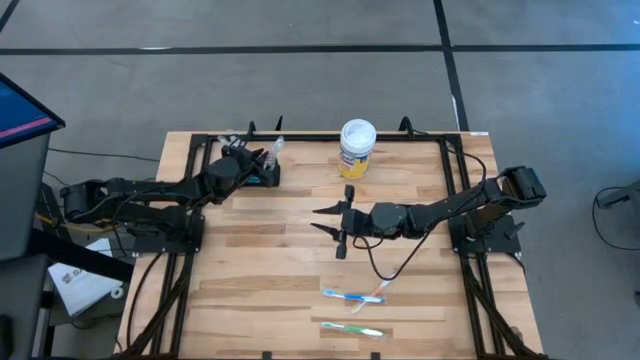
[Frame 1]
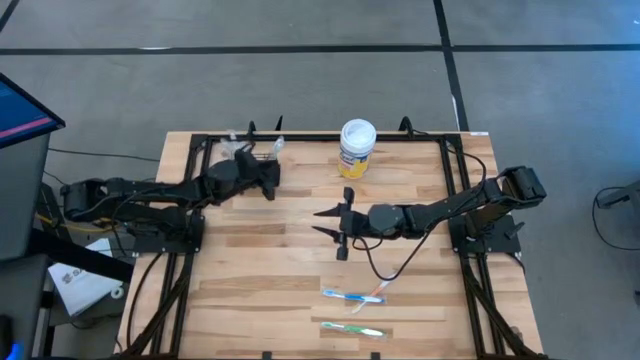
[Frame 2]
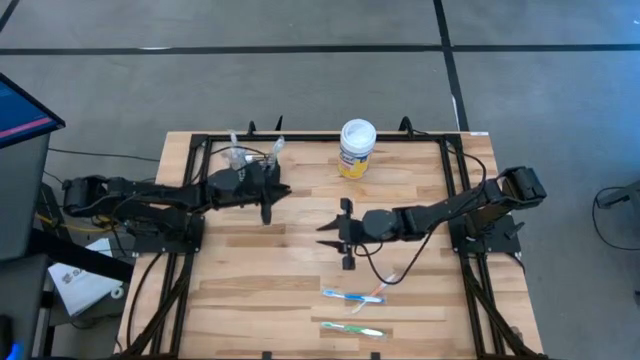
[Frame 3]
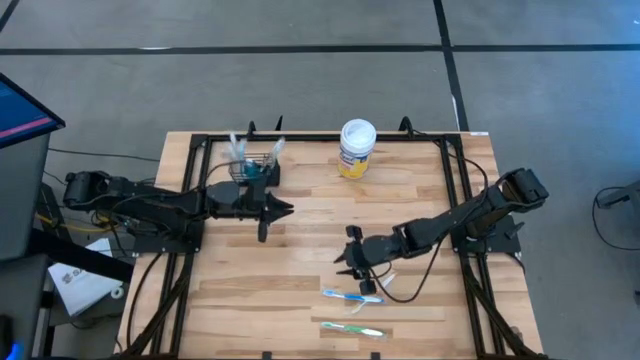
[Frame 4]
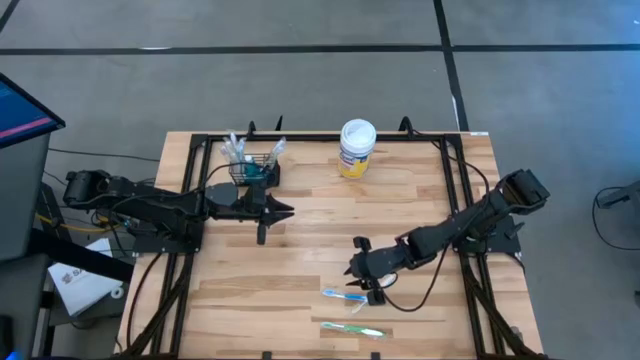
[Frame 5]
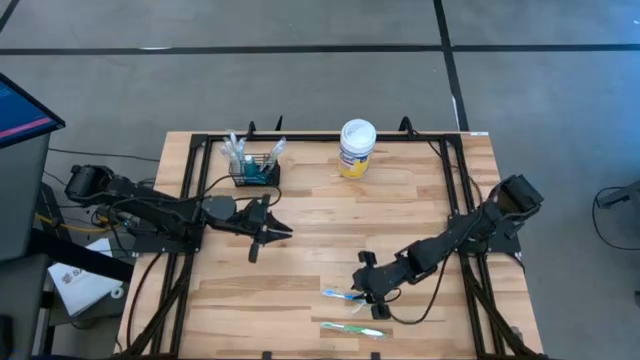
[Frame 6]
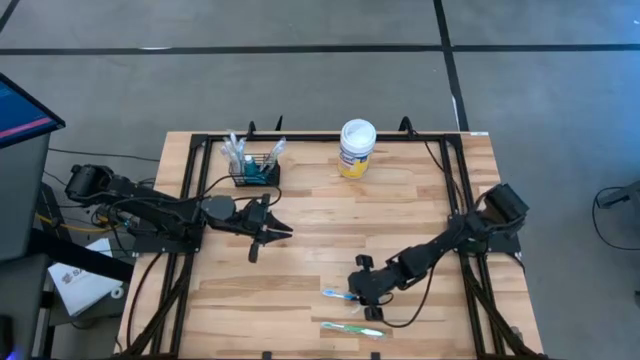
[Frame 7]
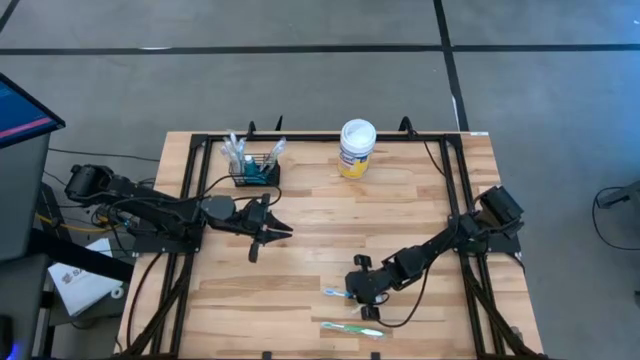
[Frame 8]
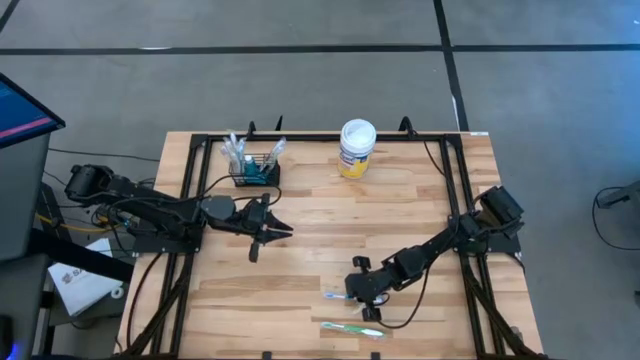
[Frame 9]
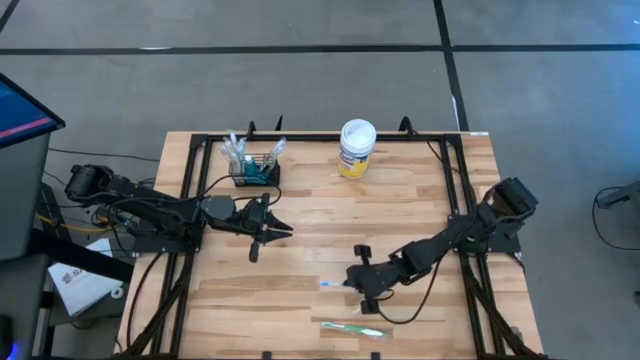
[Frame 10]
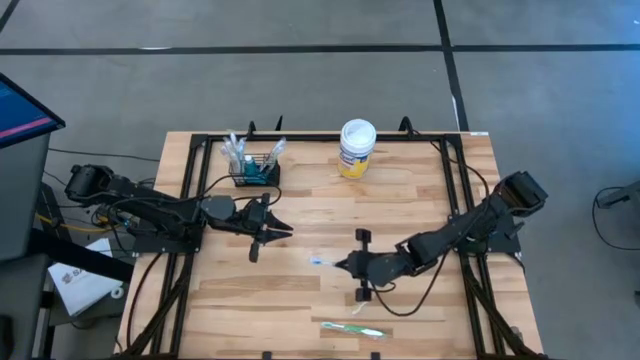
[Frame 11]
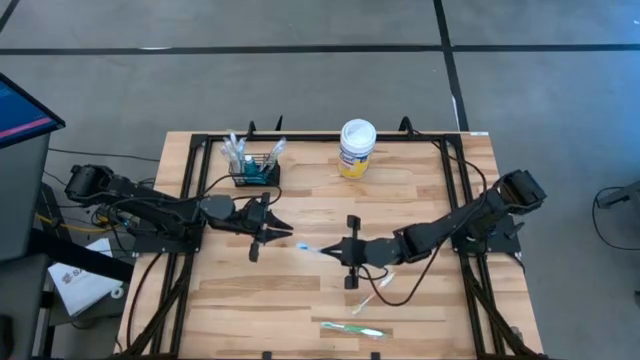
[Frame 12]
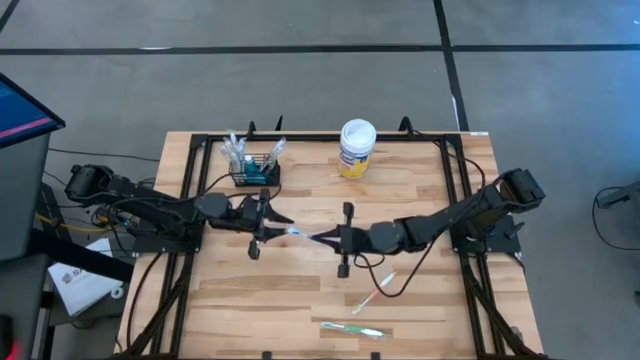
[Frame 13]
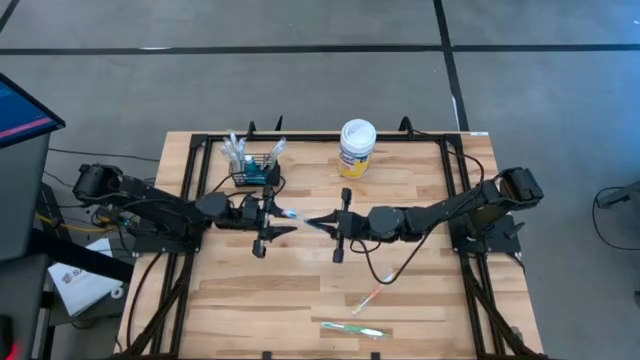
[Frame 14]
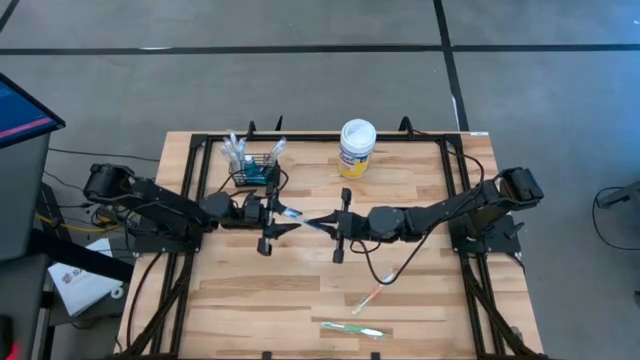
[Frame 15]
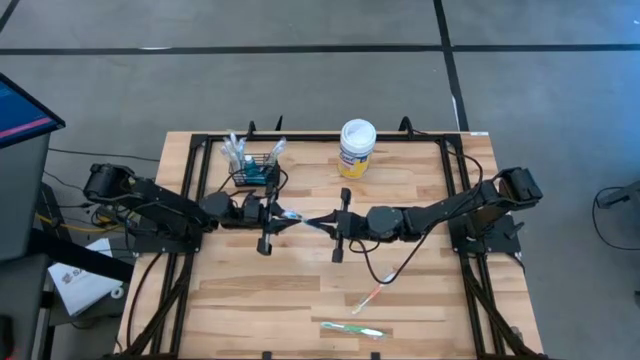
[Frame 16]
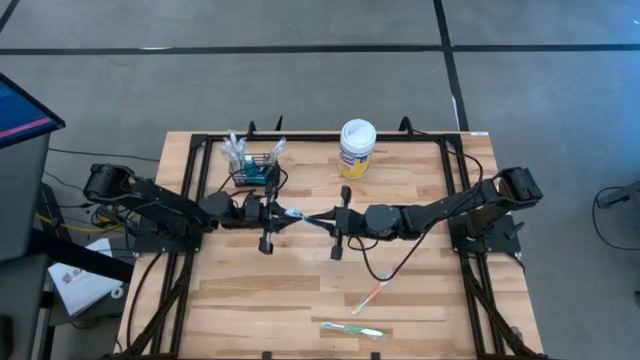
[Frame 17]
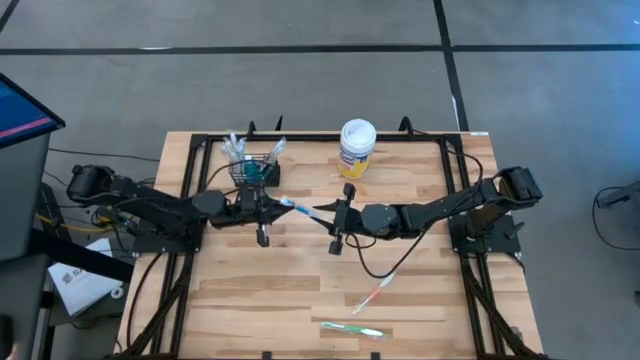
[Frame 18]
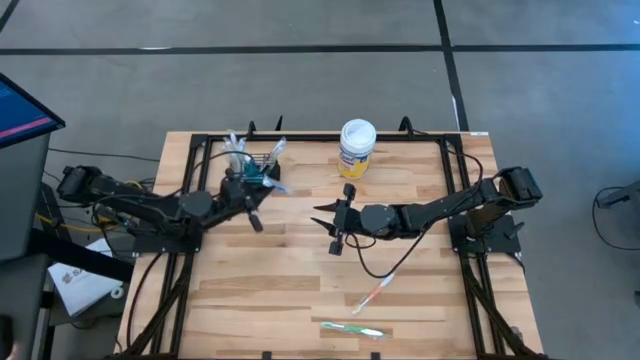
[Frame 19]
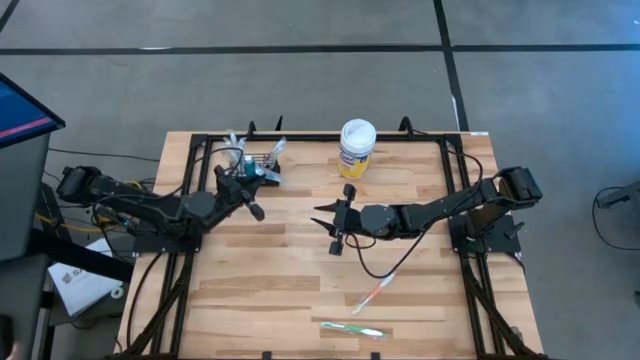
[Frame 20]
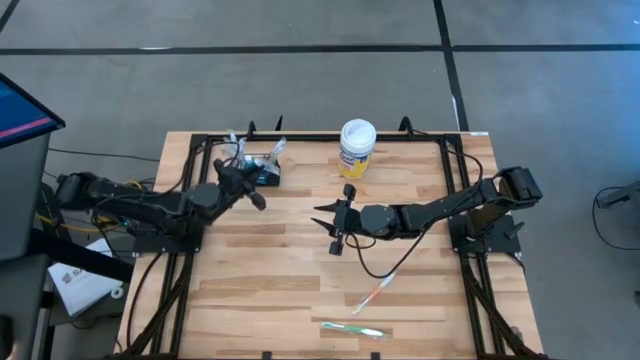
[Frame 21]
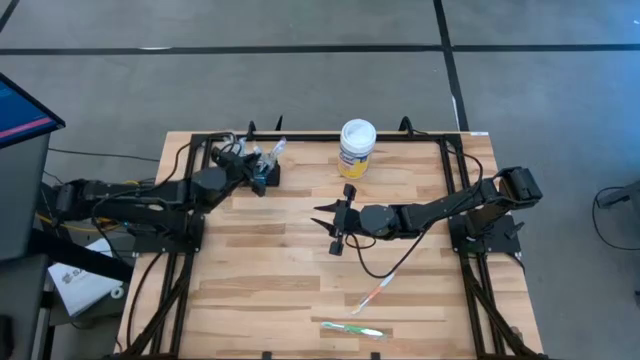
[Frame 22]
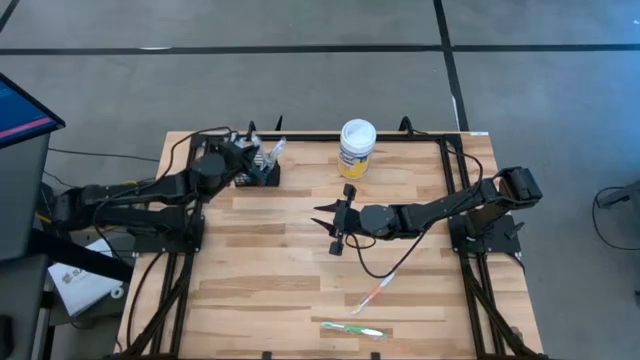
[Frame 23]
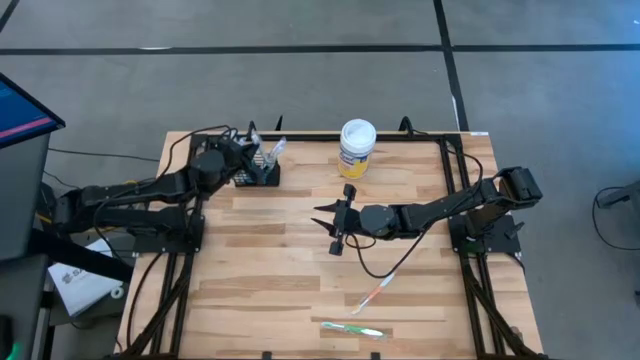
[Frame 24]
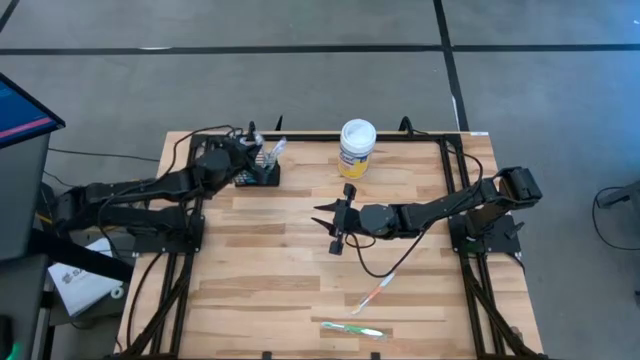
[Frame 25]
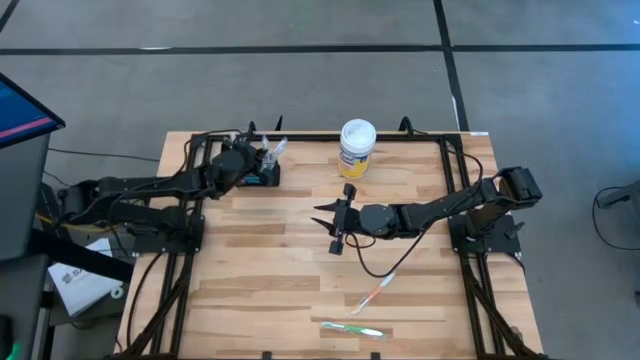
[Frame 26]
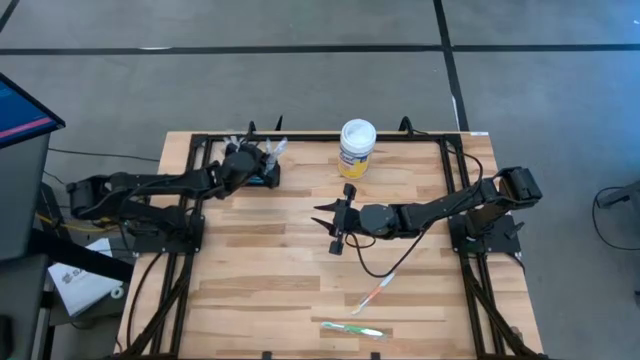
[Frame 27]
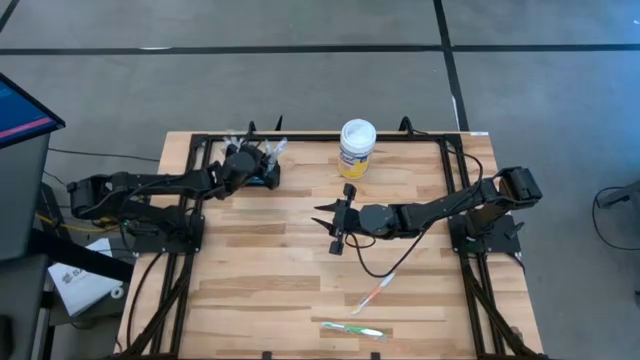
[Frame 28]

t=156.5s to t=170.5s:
Task: Pick & Place toothbrushing station
Put the blue toothbrush into the mesh organizer

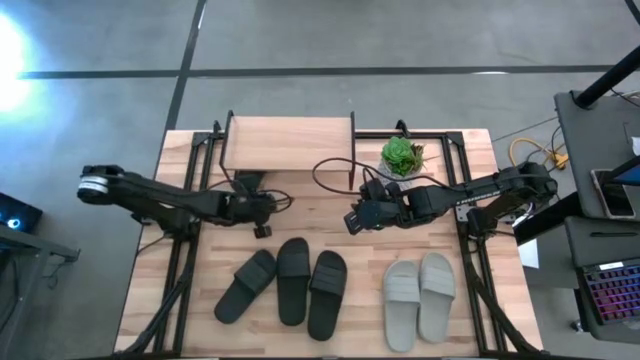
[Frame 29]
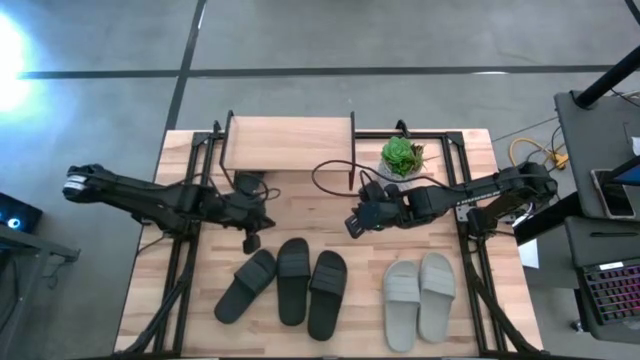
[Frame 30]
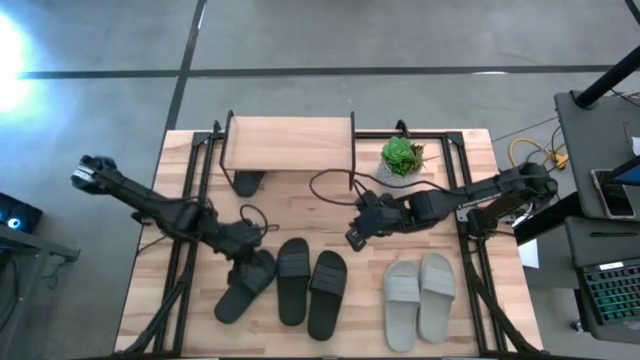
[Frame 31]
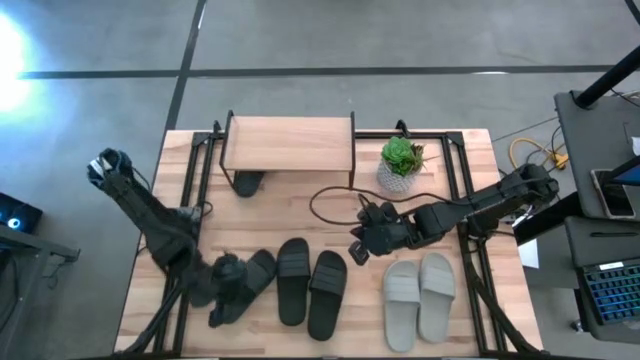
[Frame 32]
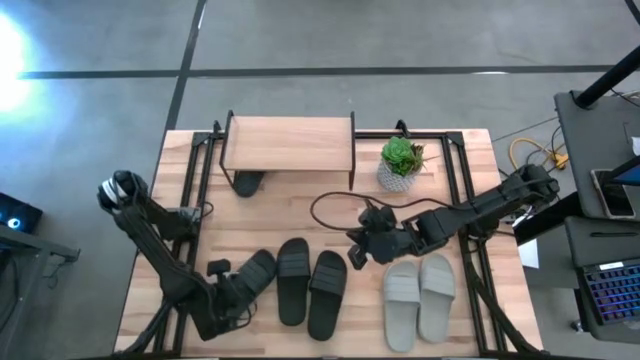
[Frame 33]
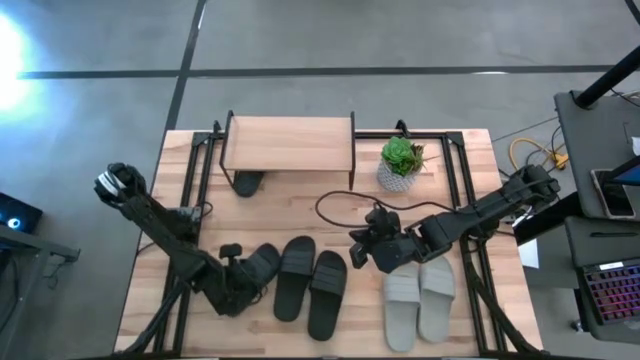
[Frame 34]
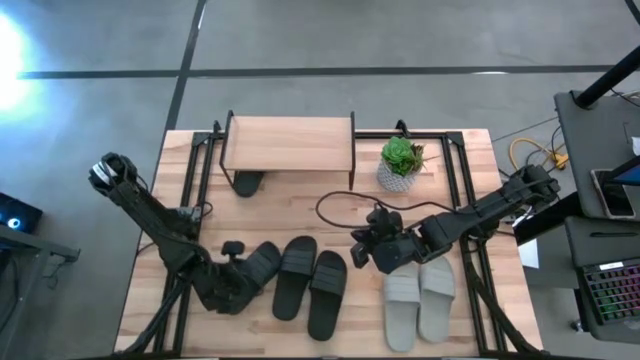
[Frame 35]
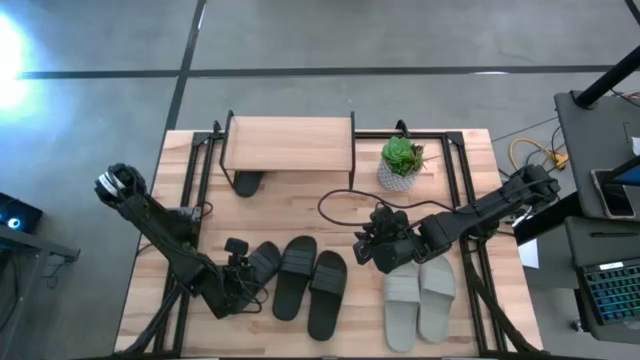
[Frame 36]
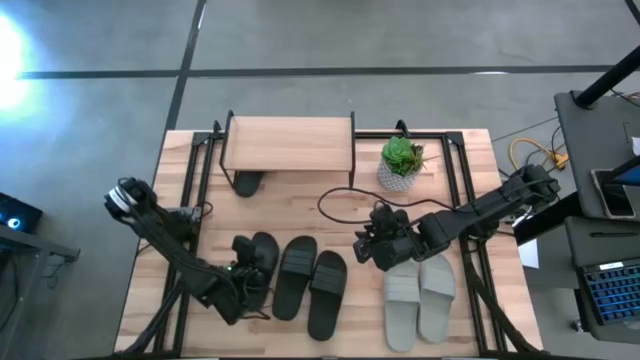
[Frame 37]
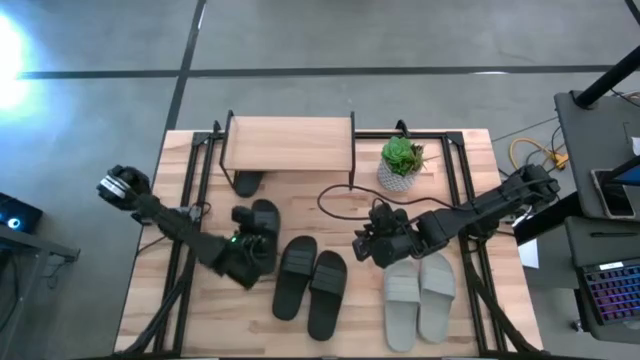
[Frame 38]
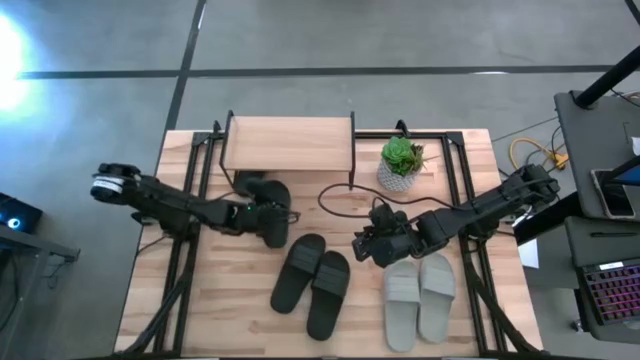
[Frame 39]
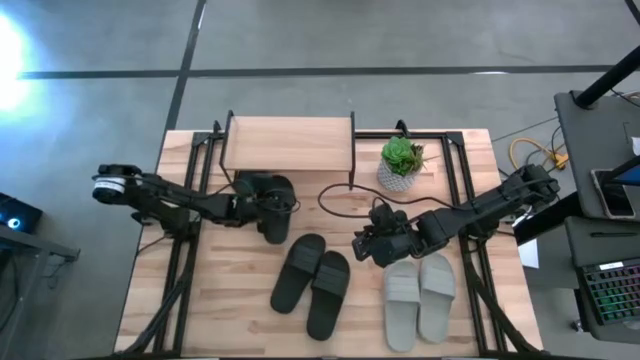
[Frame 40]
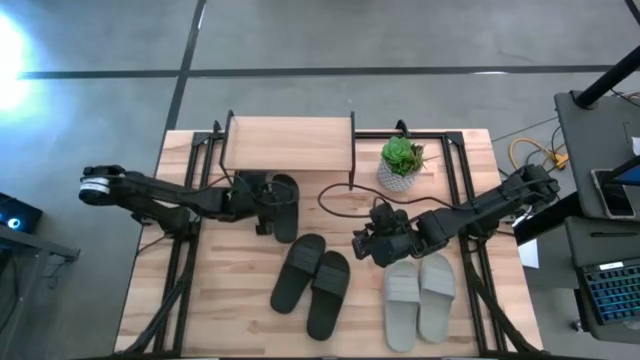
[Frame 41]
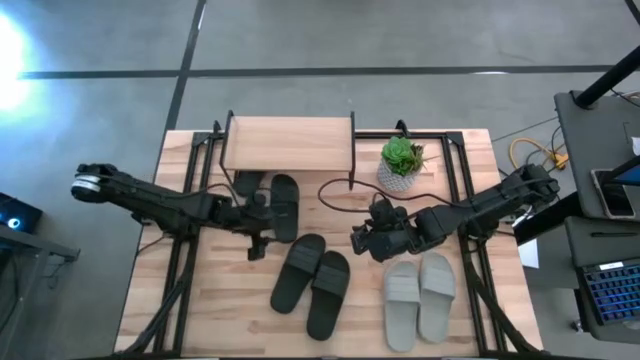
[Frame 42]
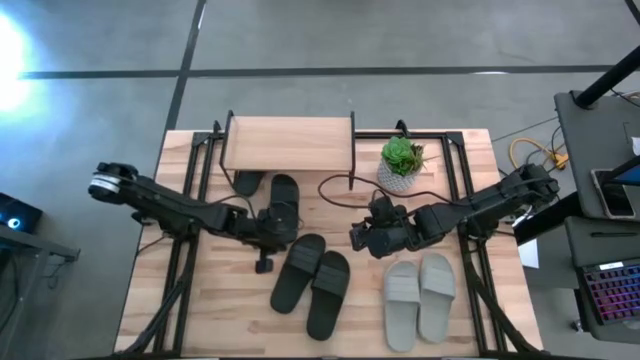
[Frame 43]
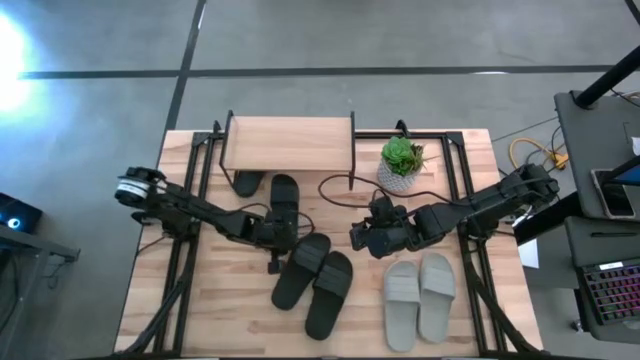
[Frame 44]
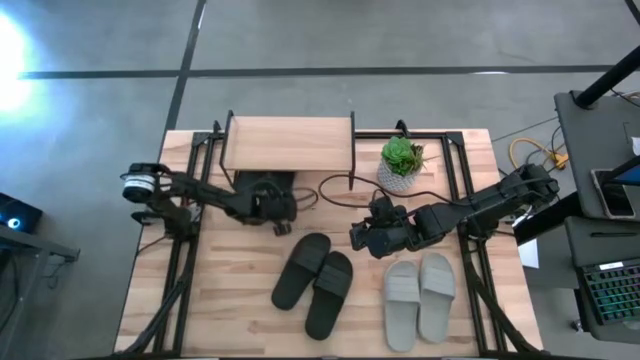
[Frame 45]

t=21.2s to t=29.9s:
Task: Pick and place slides into the shelf
Put the black slide under the shelf
